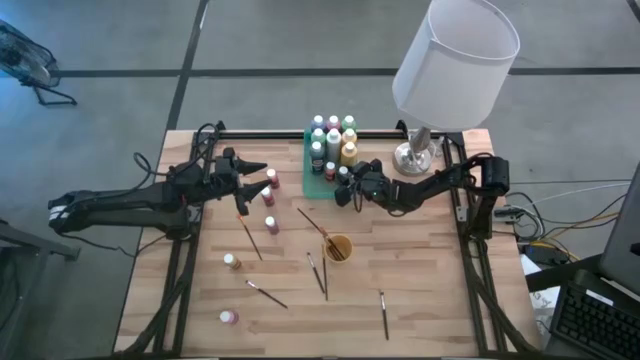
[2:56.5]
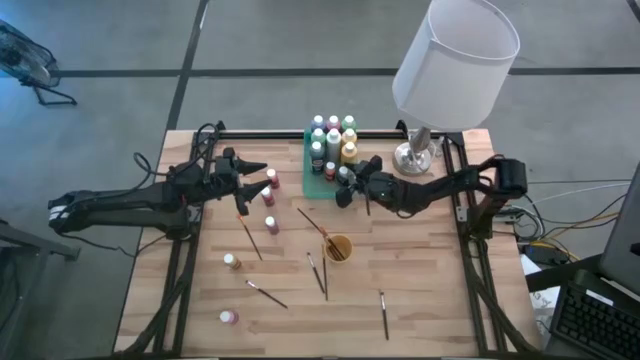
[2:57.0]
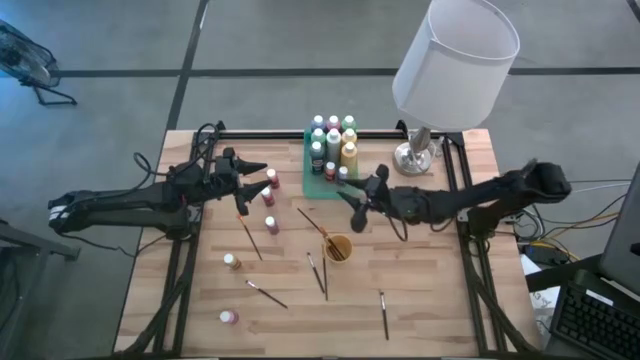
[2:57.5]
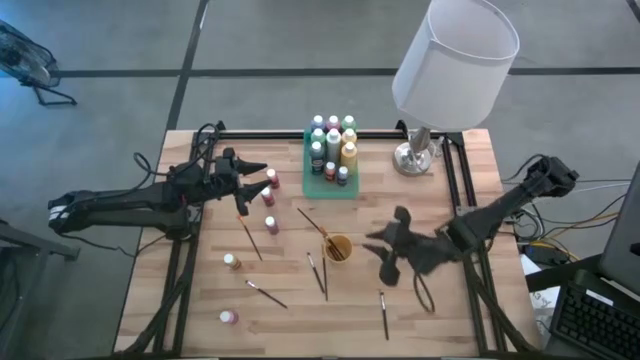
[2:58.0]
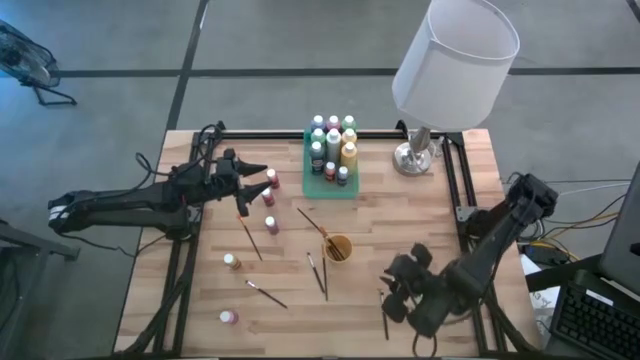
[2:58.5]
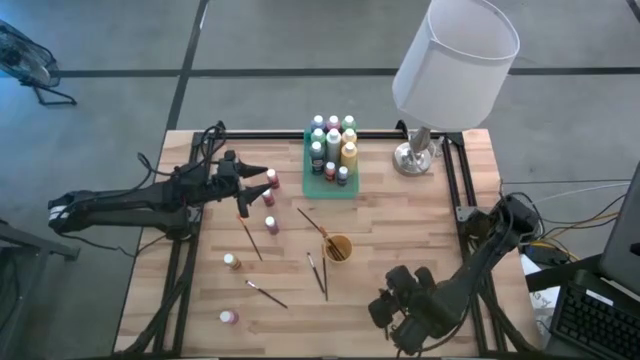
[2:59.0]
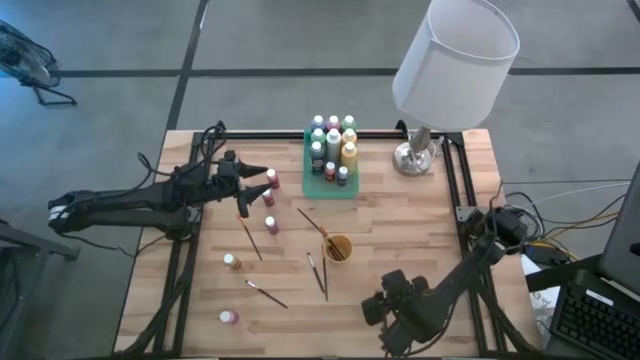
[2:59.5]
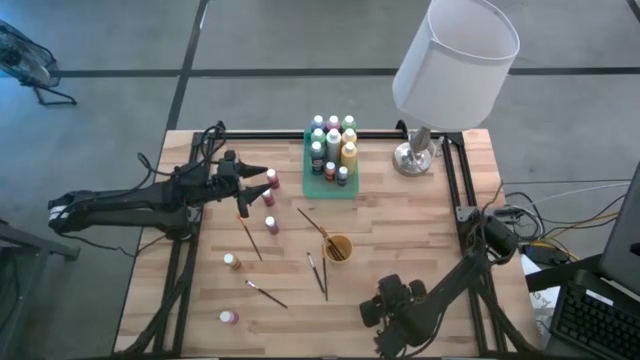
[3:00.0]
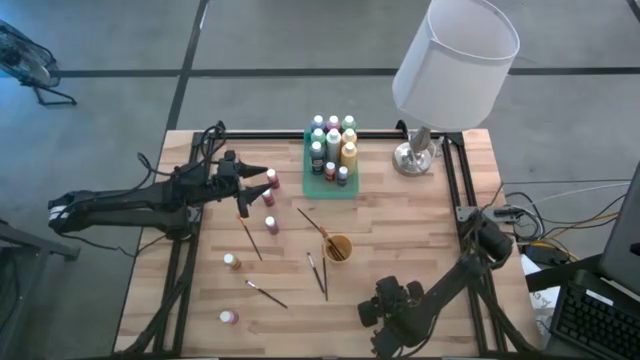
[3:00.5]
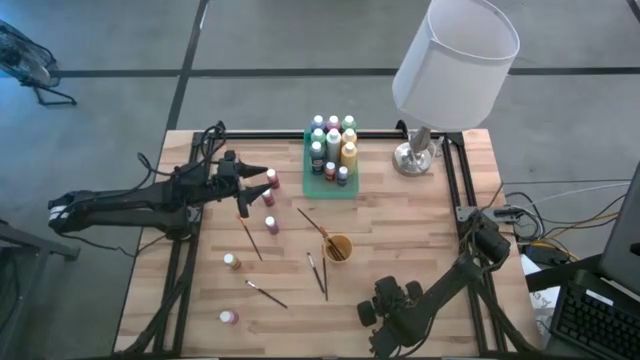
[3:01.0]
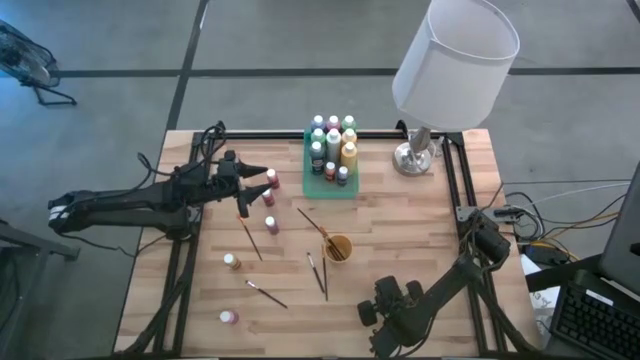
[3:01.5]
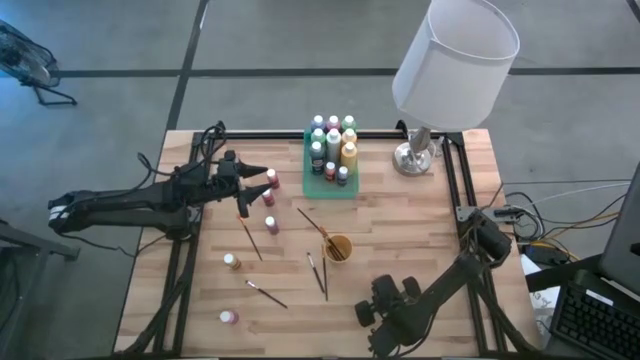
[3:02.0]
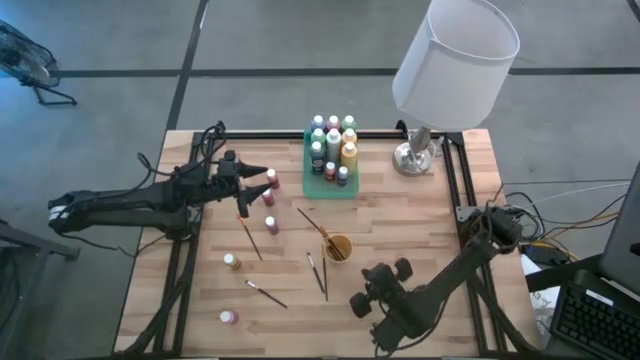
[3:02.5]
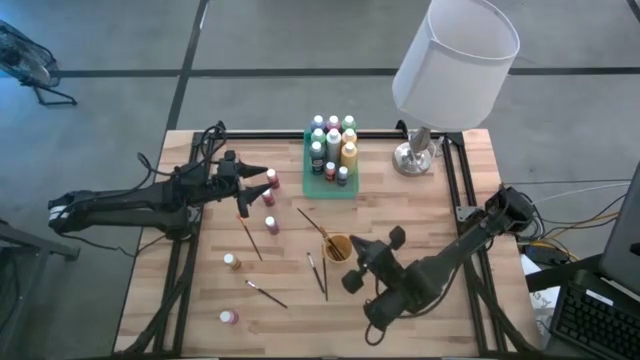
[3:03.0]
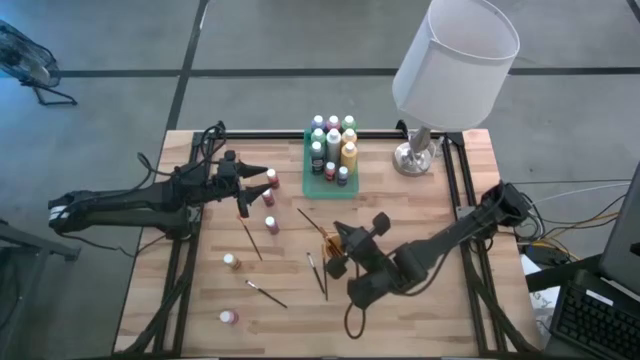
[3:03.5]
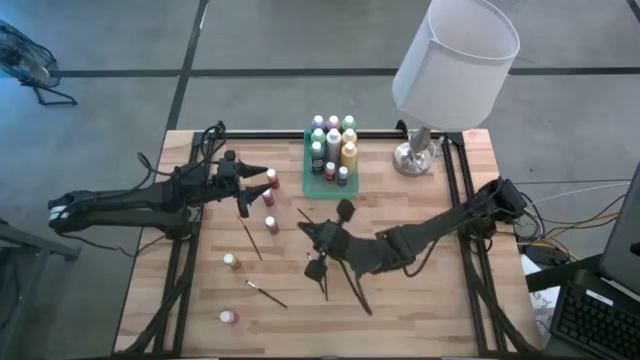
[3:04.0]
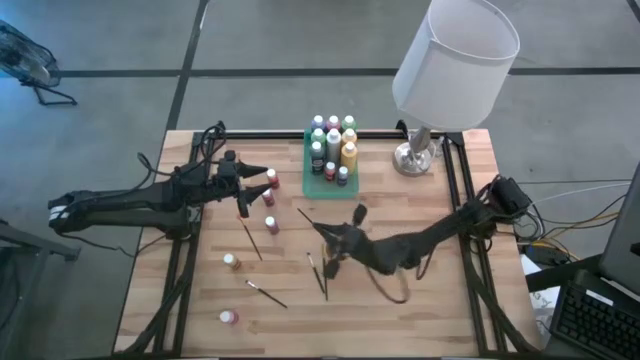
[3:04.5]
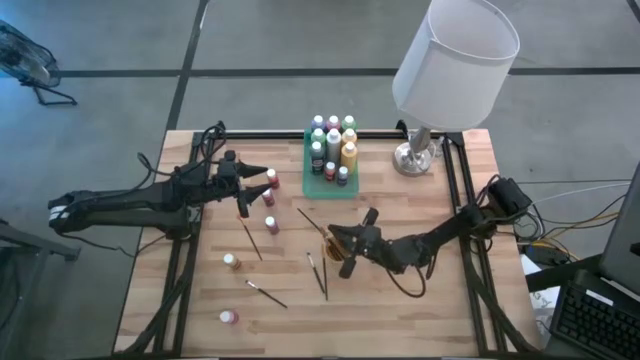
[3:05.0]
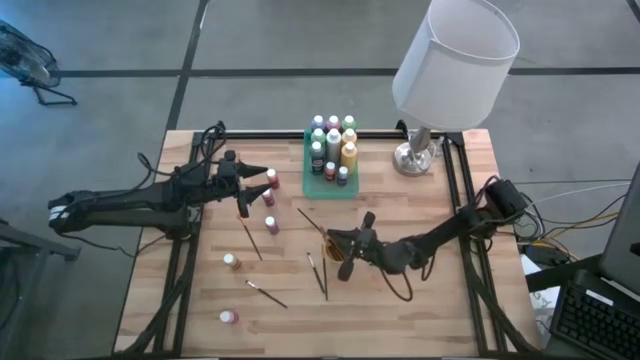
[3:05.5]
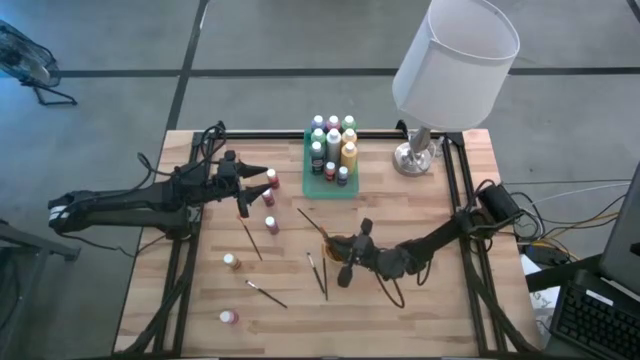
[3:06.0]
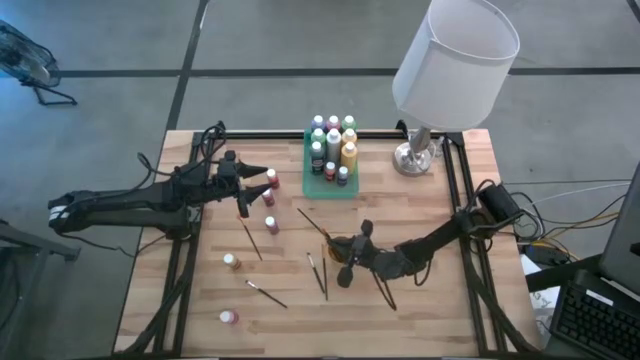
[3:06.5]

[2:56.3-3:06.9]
Task: Pick & Place Paint Supplies
Put the silver paintbrush into the yellow cup

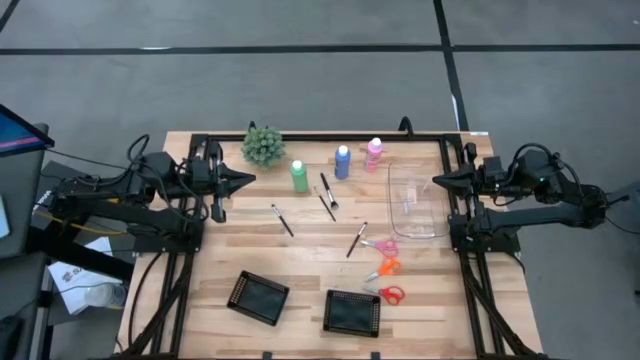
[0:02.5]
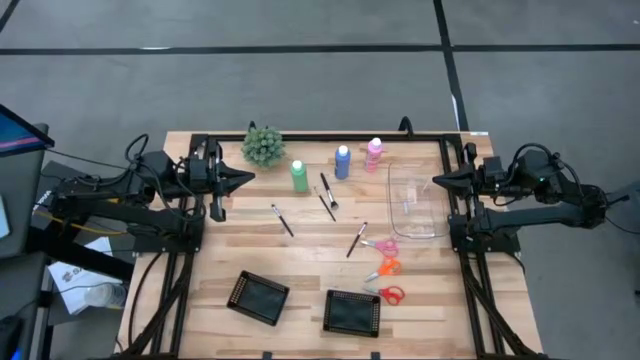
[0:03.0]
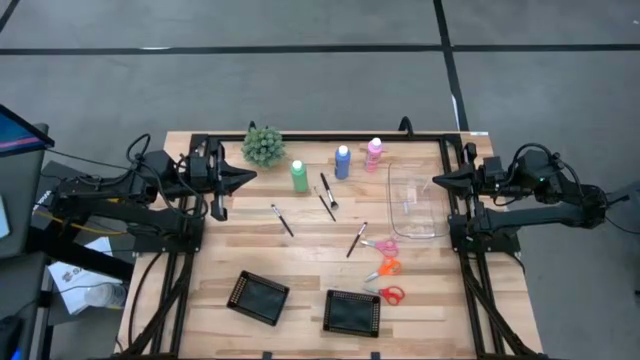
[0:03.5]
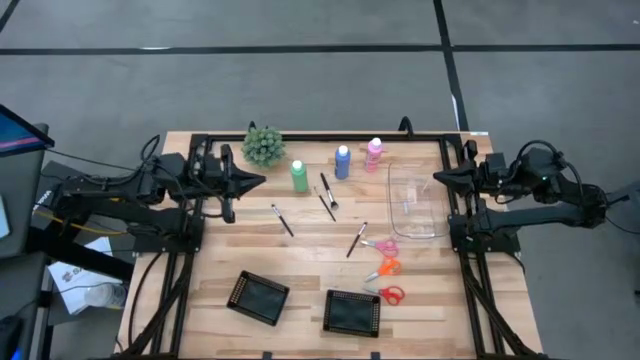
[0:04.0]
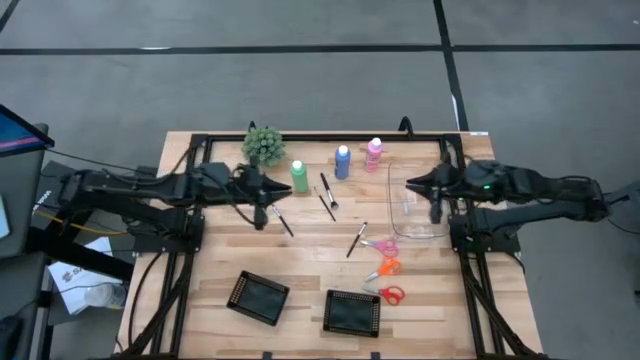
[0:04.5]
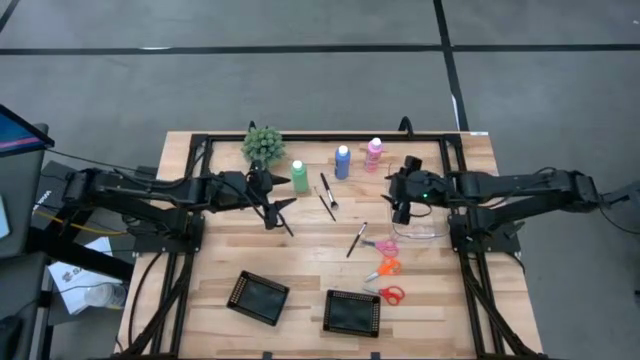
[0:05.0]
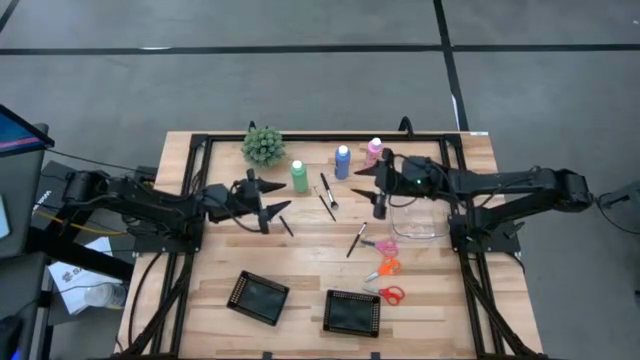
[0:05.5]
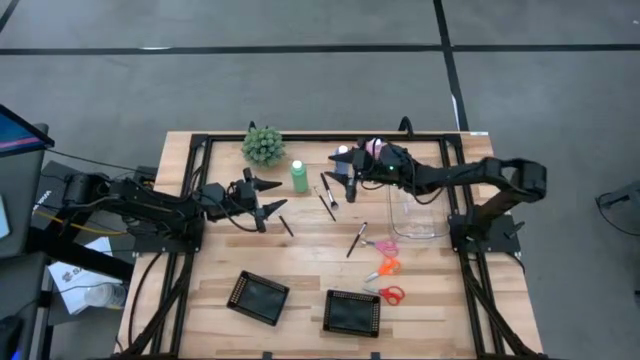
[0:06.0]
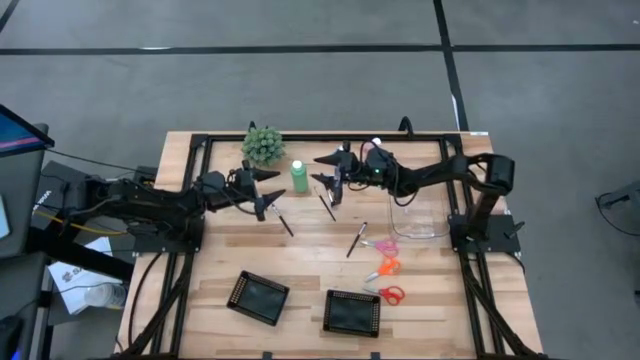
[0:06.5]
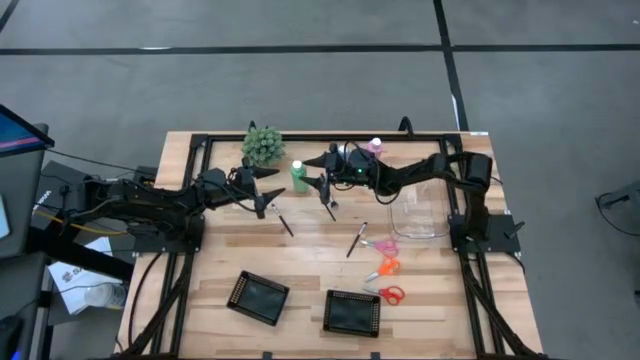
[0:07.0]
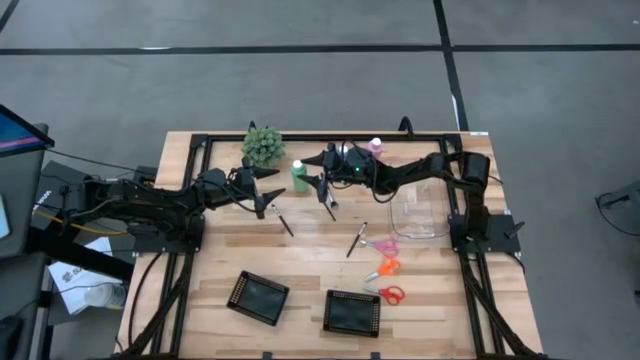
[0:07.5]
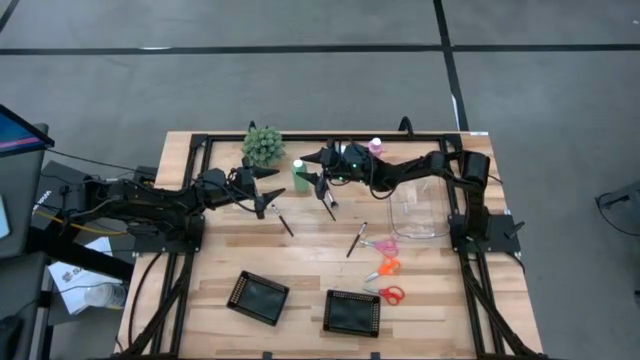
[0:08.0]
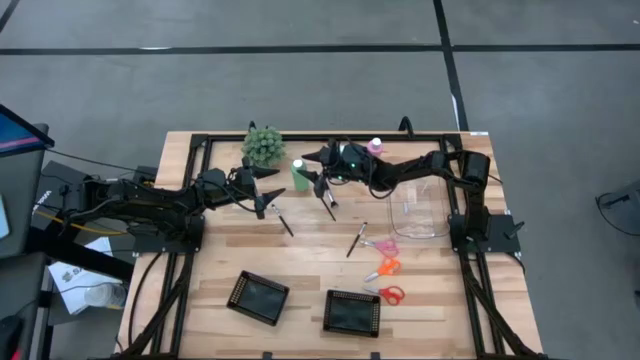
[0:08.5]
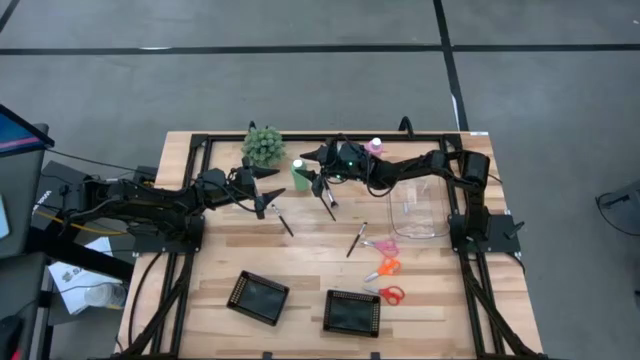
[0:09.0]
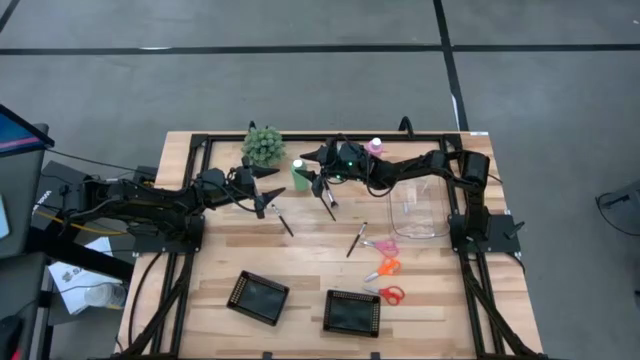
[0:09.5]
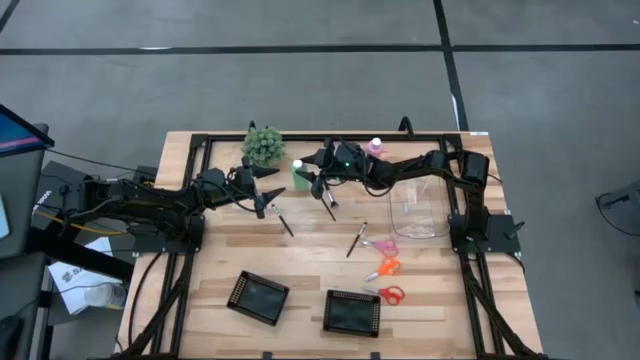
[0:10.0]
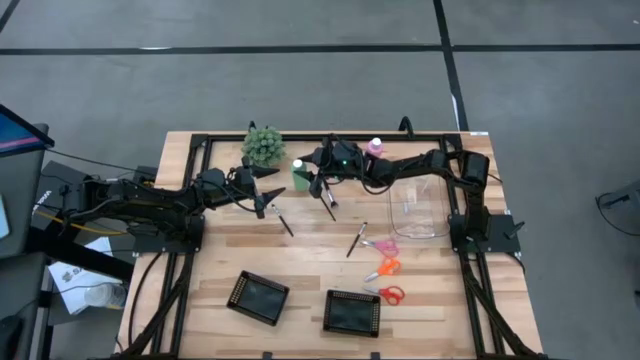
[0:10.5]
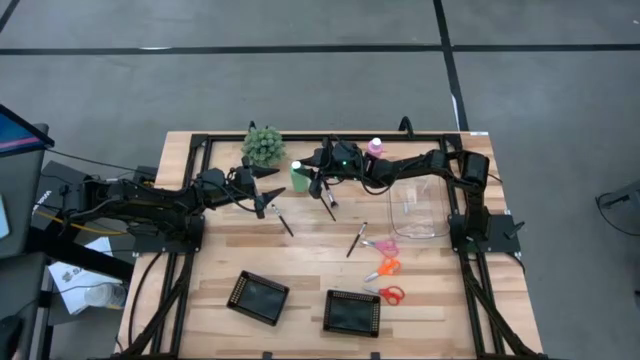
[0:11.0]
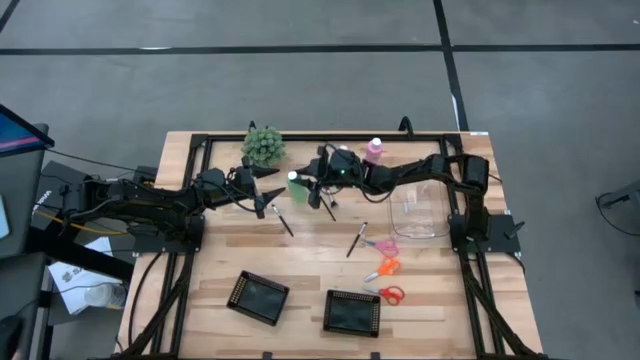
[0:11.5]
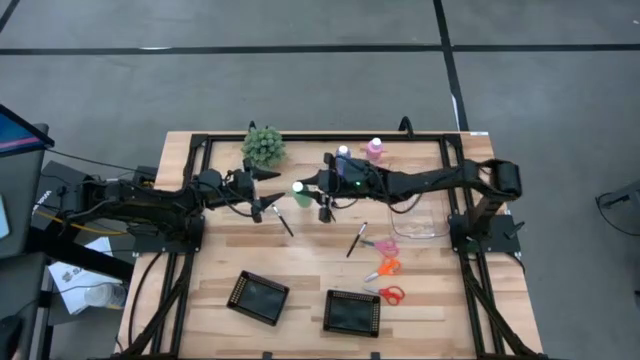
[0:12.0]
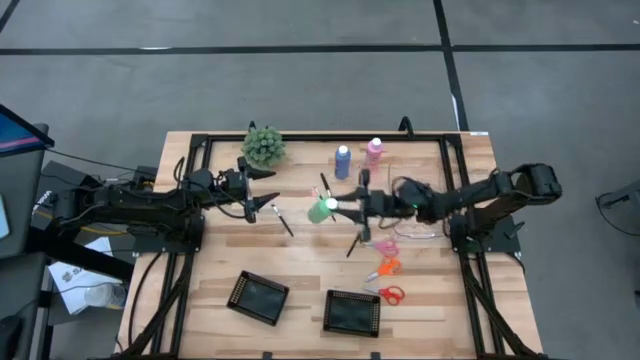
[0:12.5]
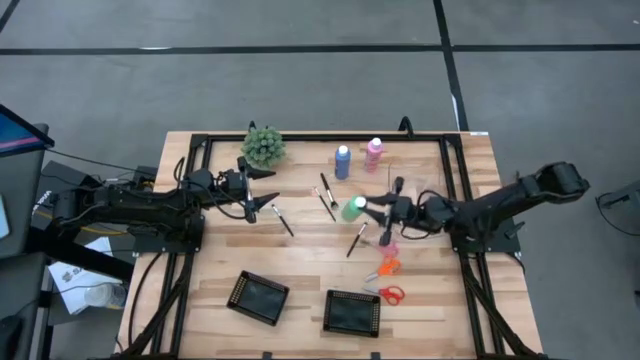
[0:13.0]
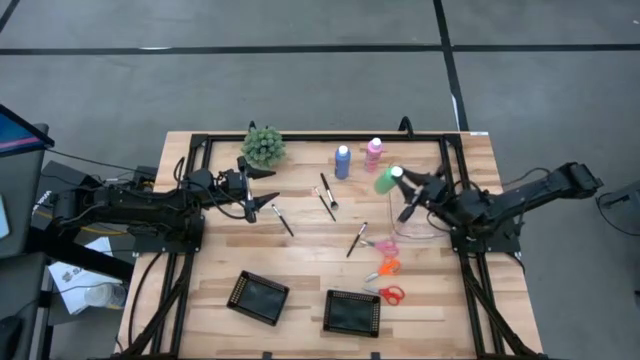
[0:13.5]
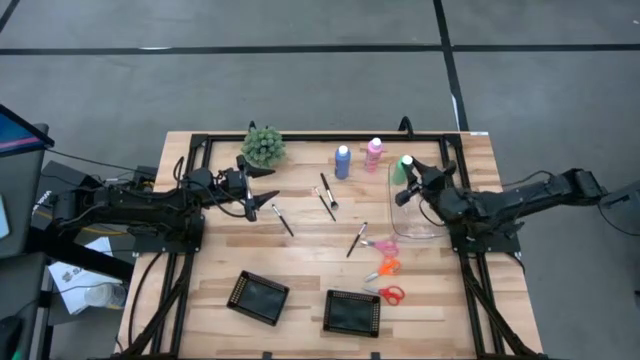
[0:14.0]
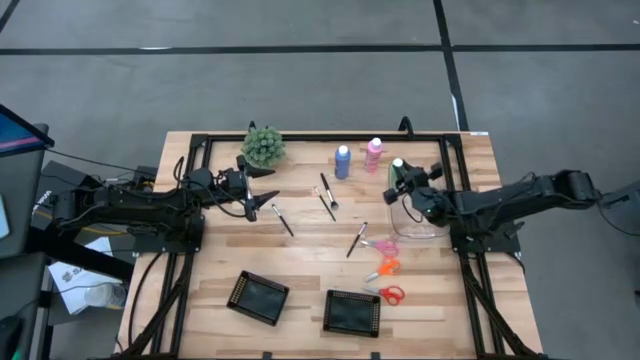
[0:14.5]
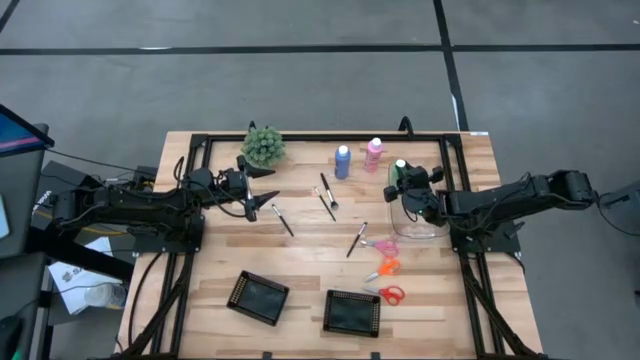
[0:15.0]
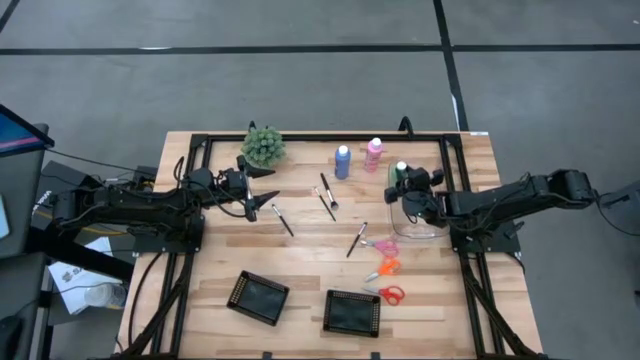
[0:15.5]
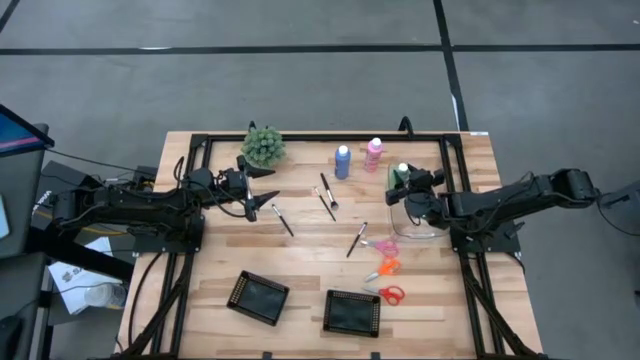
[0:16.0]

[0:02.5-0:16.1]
Task: Pick & Place Paint Supplies
Put the green paint bottle into the transparent bin
